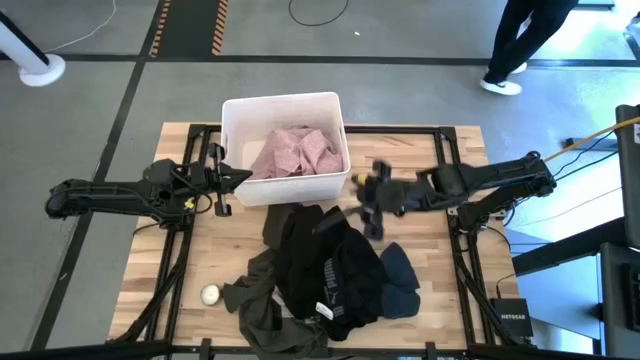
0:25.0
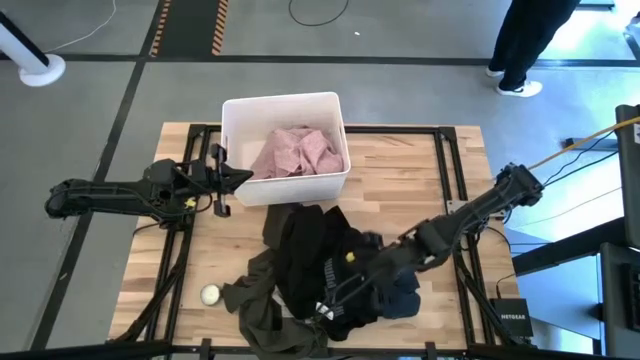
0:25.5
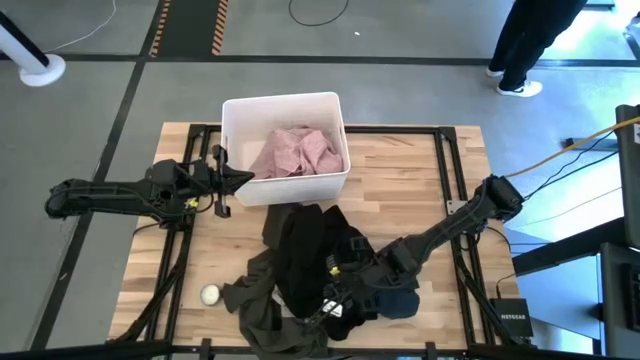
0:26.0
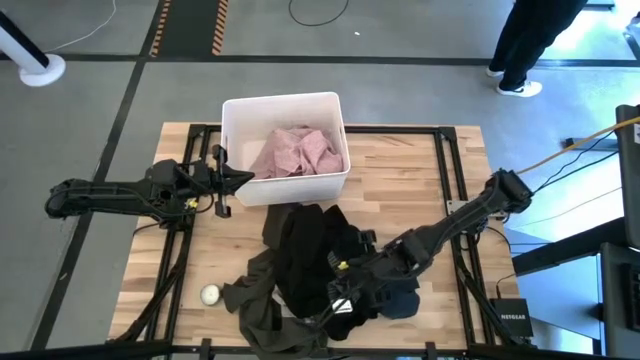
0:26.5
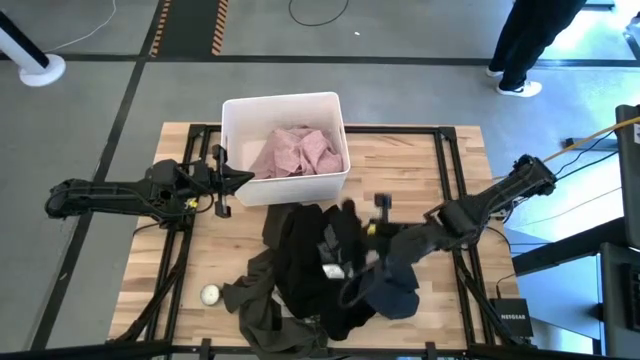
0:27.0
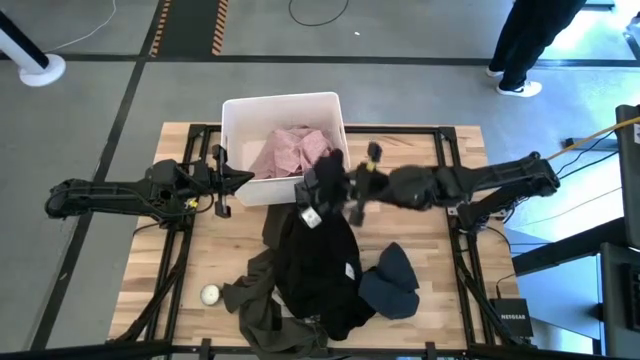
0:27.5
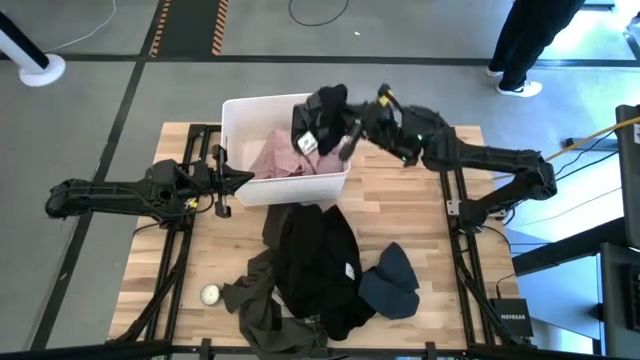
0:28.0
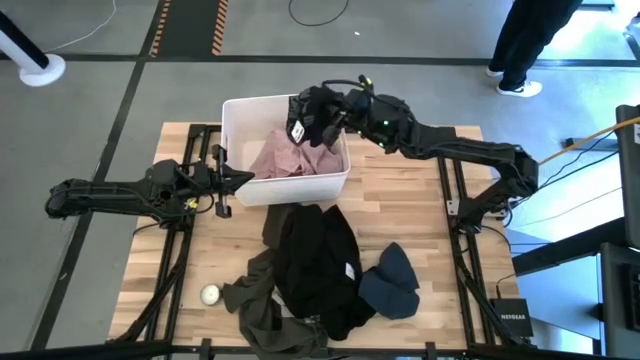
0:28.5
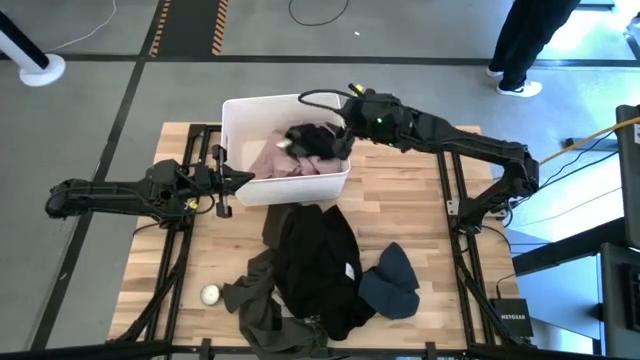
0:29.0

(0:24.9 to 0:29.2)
Task: Sort clothes
Put the black underwear into the white laundry organizer

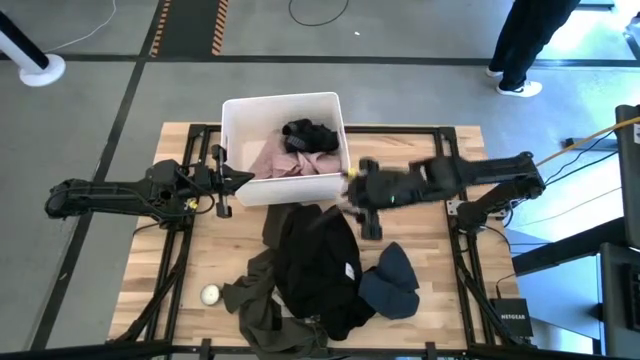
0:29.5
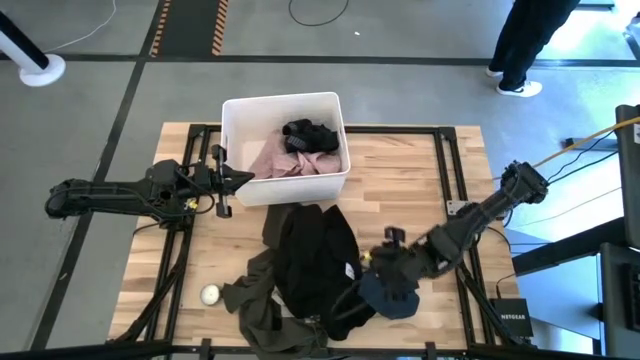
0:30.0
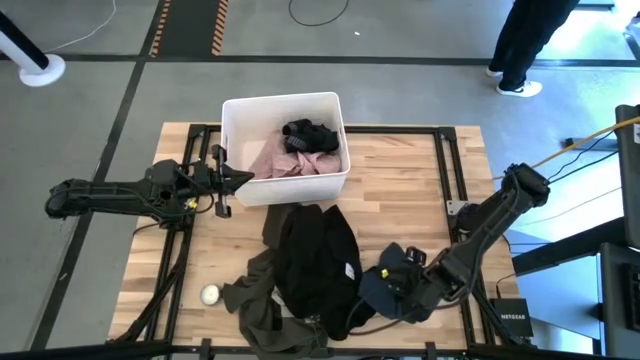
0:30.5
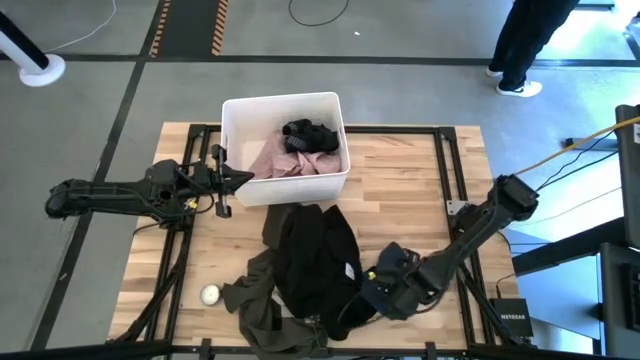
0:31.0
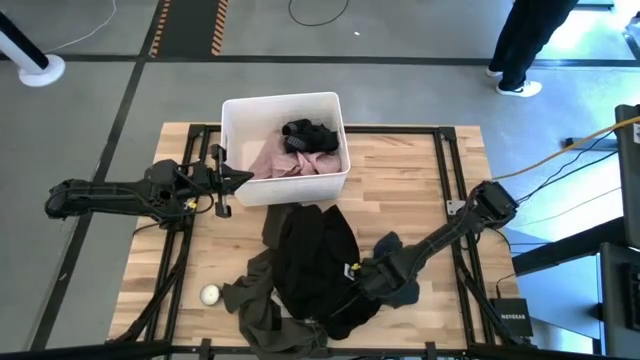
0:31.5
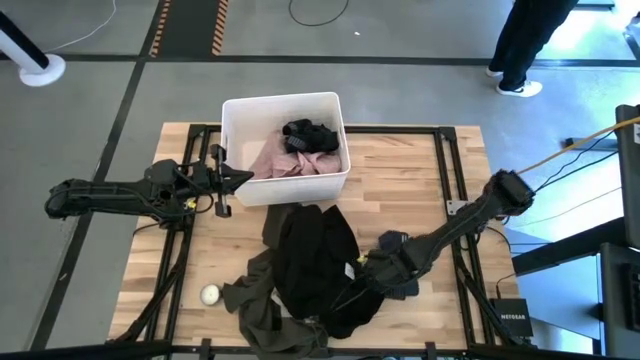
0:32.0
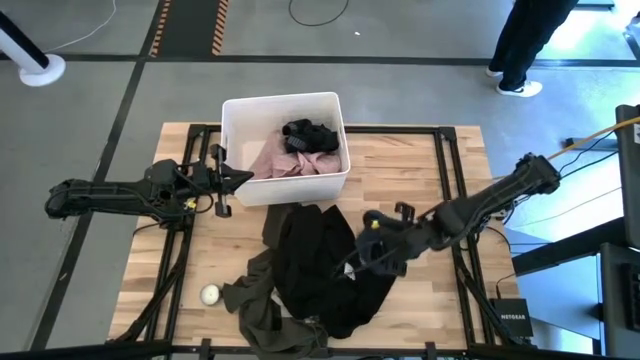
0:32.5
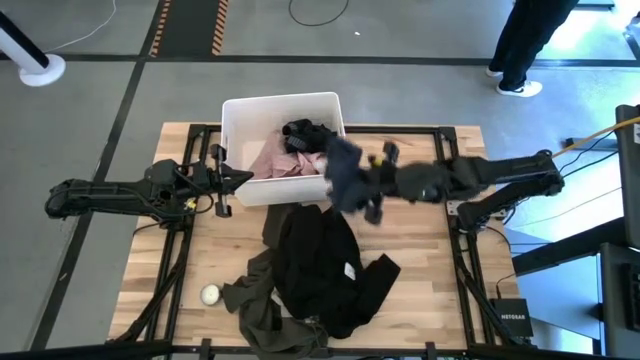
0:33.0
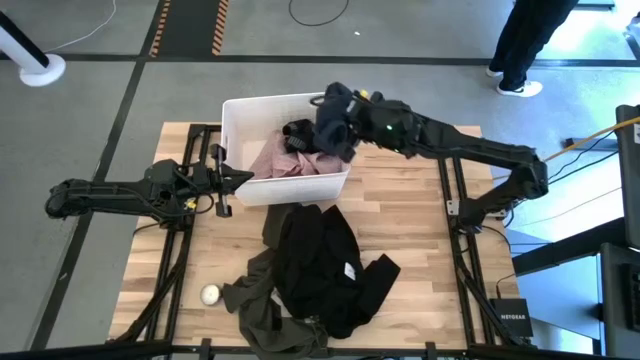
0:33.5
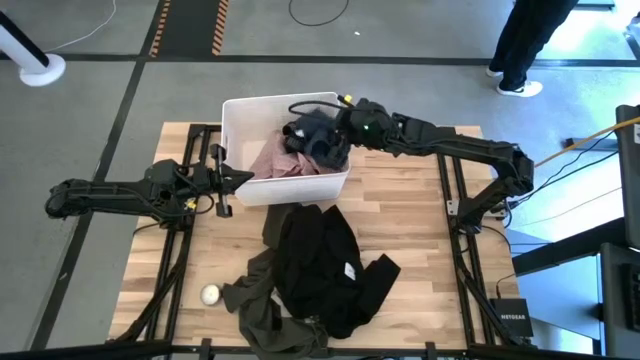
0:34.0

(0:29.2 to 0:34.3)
Put the gray underwear into the white laundry organizer

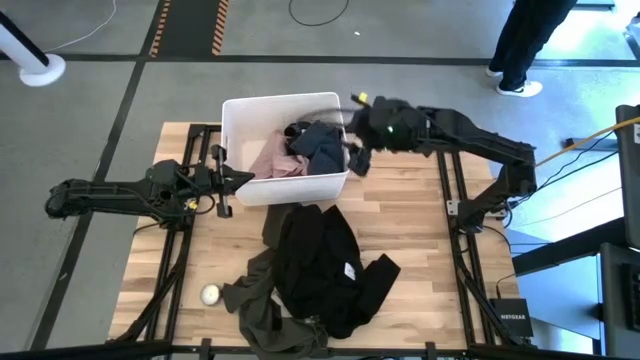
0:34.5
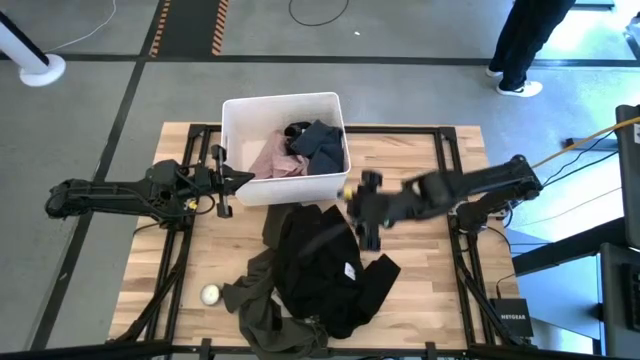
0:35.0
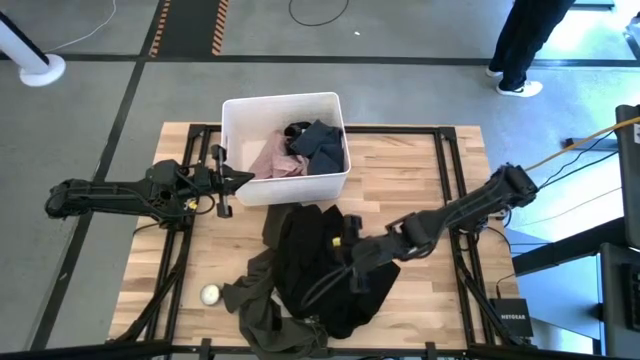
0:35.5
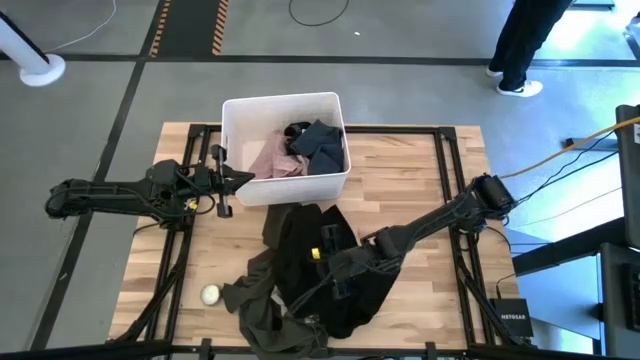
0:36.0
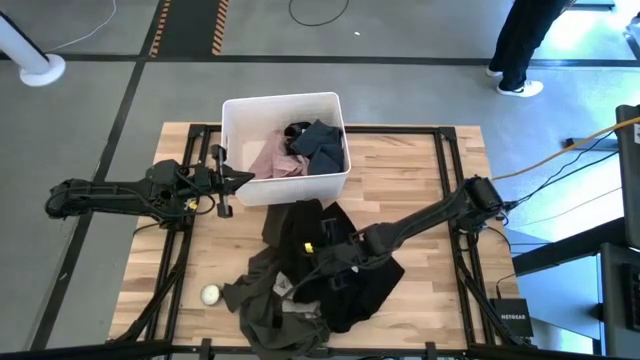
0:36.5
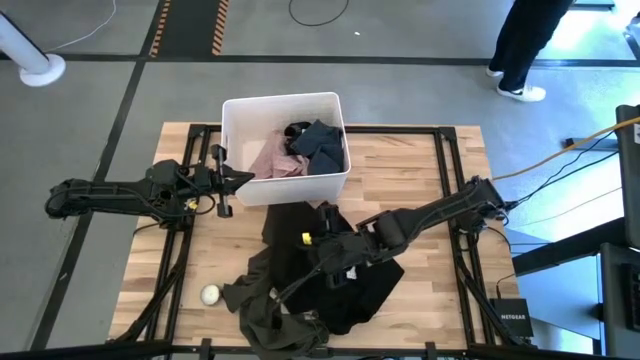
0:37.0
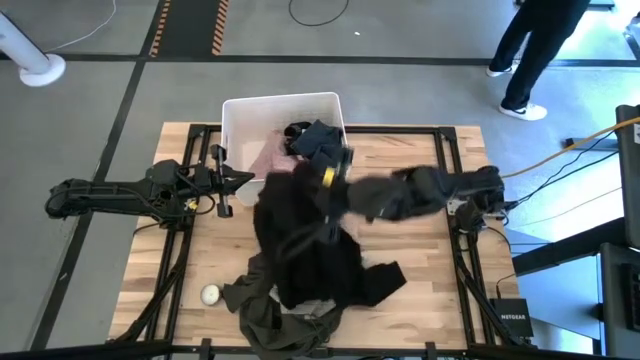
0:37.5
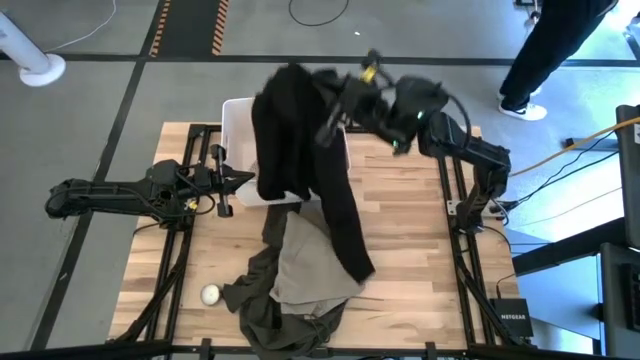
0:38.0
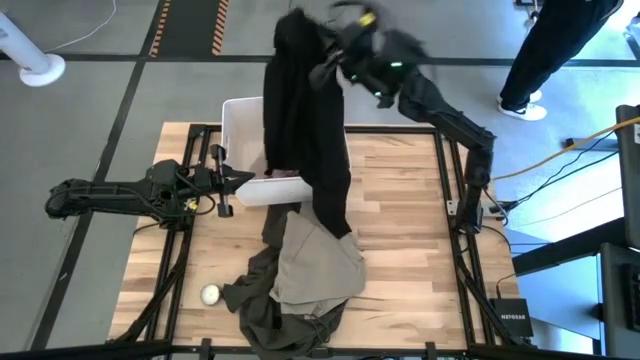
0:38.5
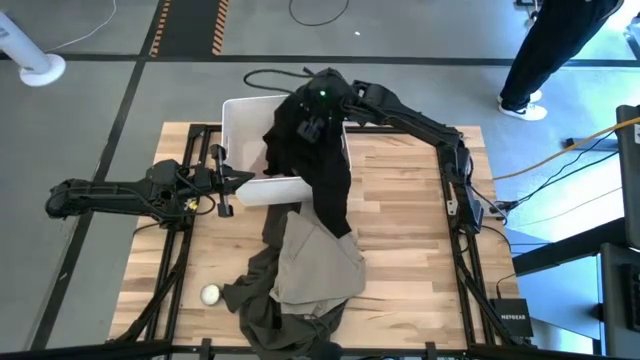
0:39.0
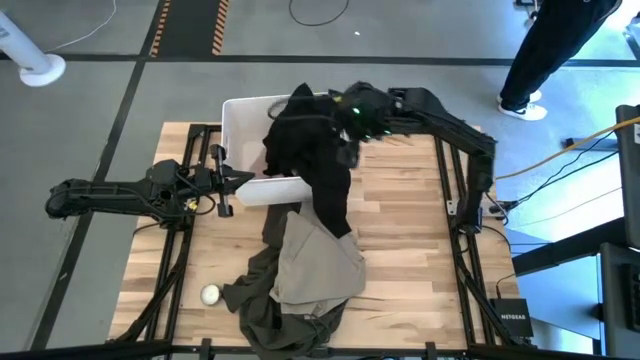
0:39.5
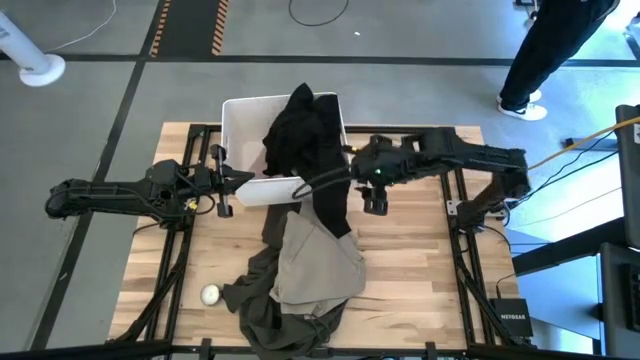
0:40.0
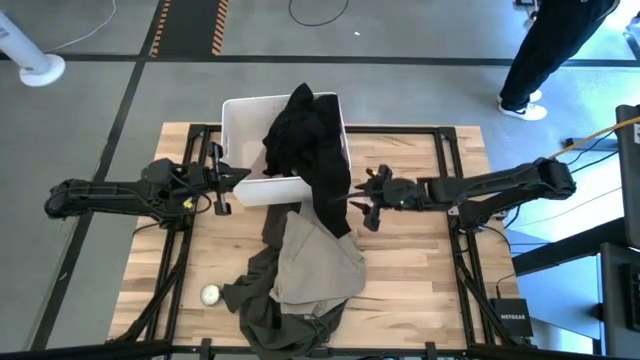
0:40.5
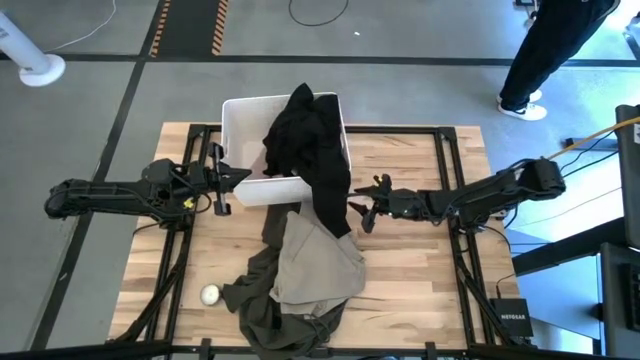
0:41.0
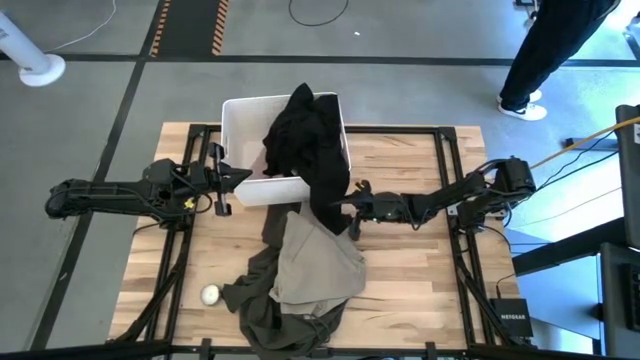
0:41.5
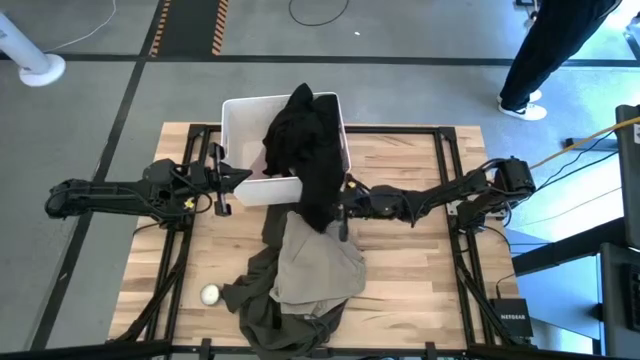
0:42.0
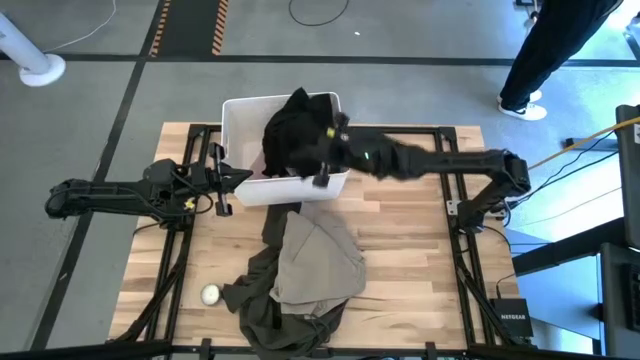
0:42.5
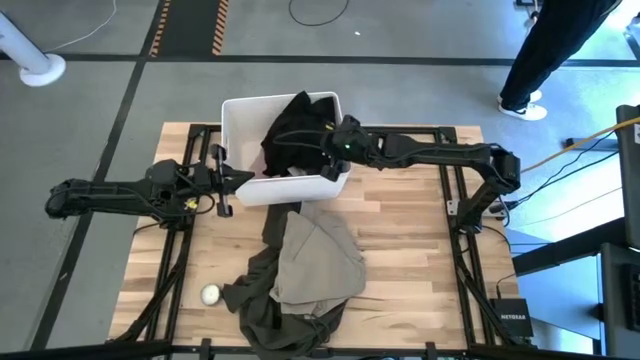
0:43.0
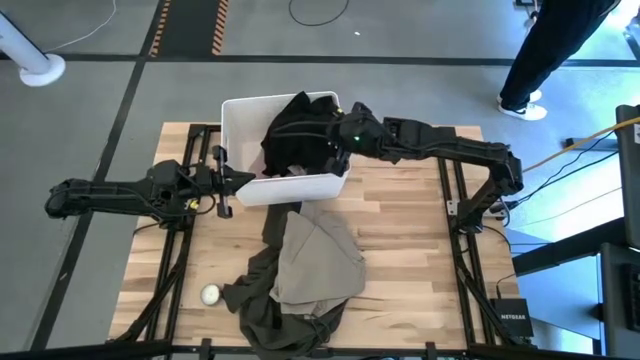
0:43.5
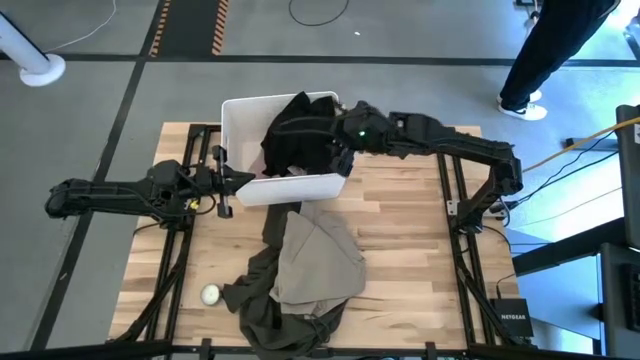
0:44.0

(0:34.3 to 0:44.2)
Put the black shirt into the white laundry organizer

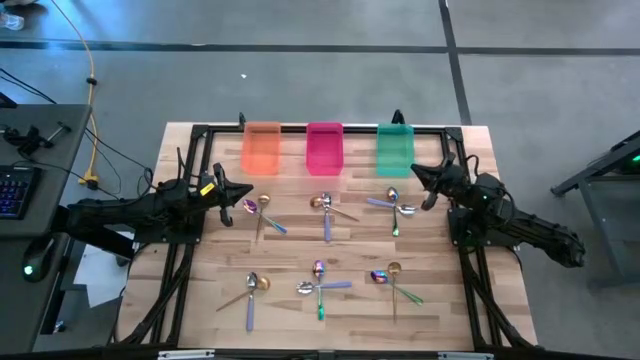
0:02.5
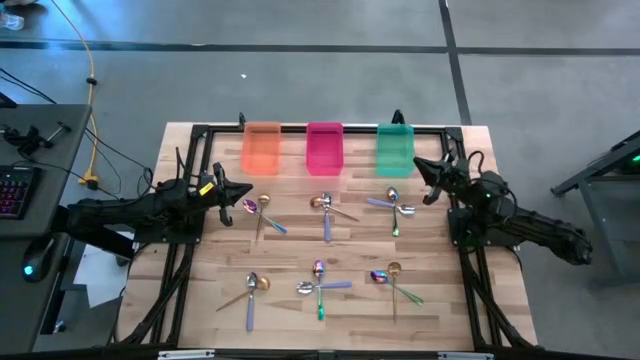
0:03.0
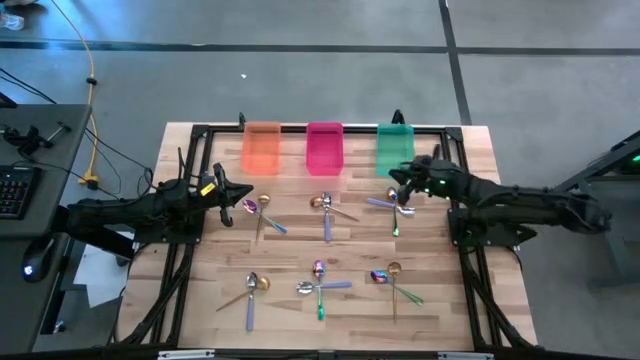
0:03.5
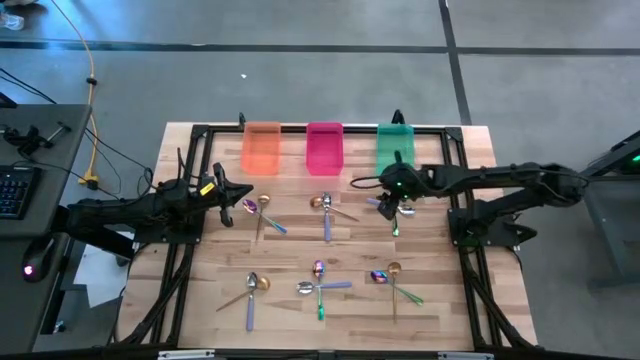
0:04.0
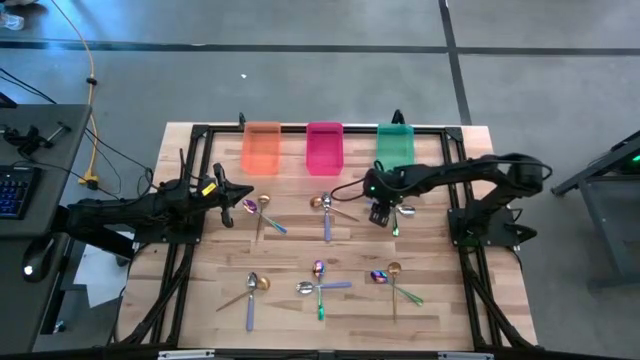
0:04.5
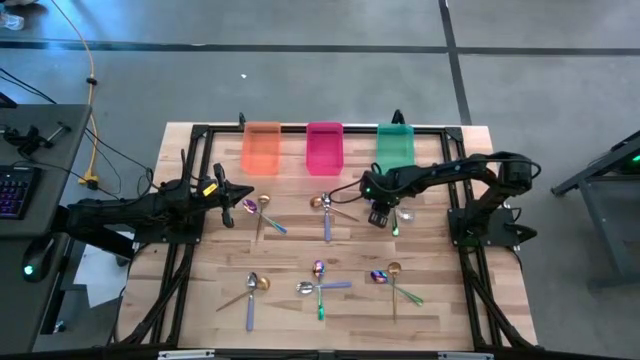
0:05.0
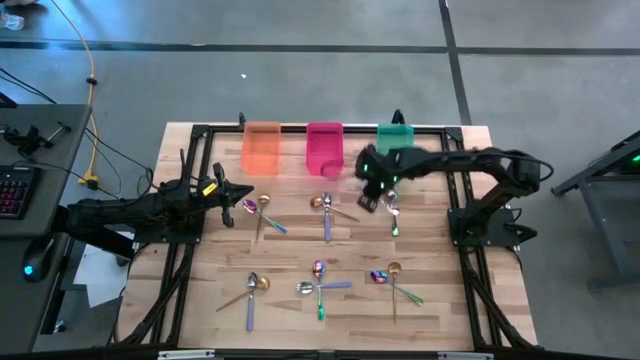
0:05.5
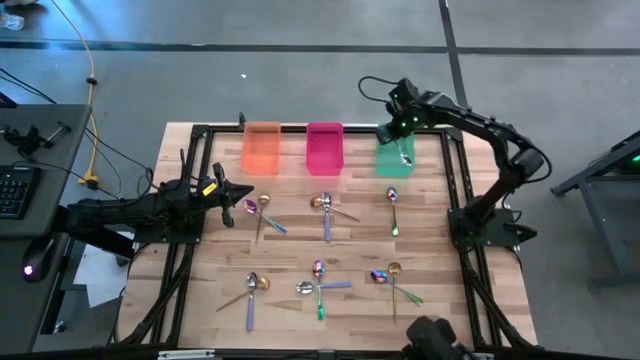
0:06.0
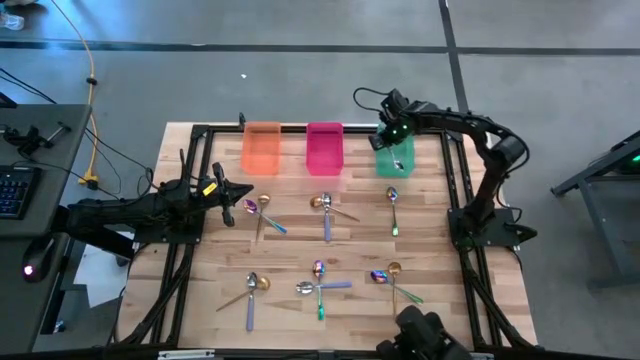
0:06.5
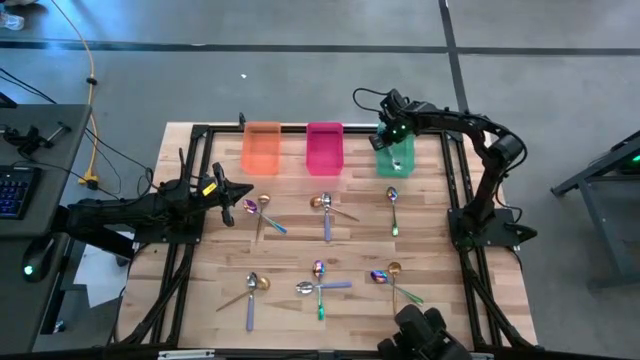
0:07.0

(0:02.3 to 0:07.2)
Task: Sort silverware by color (type)
Put the top right purple spoon into the green bin
